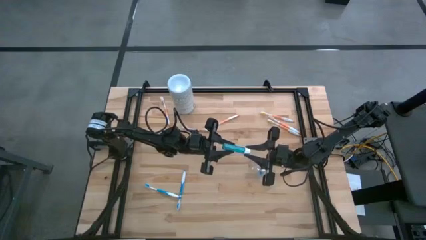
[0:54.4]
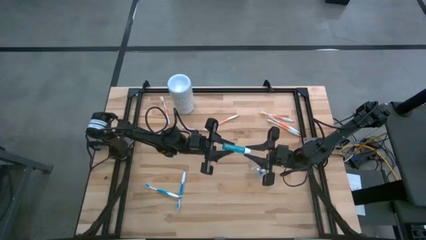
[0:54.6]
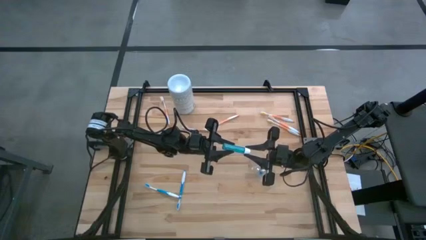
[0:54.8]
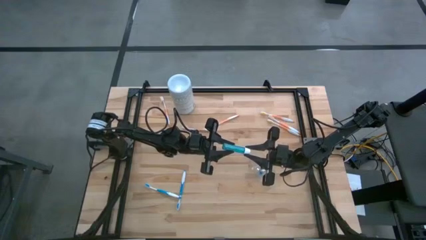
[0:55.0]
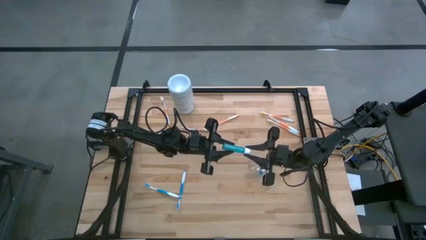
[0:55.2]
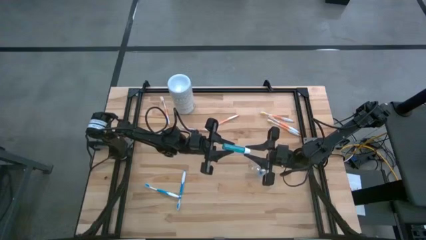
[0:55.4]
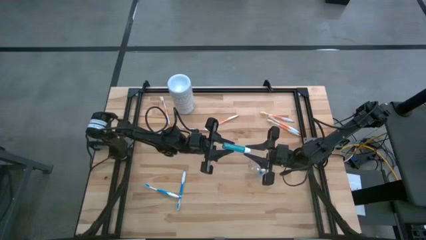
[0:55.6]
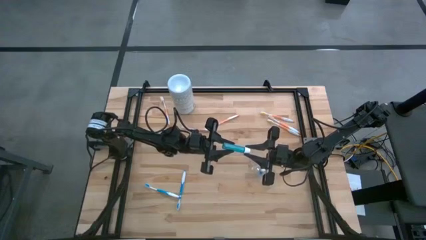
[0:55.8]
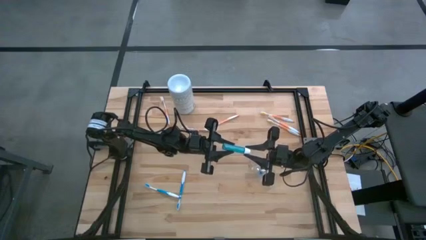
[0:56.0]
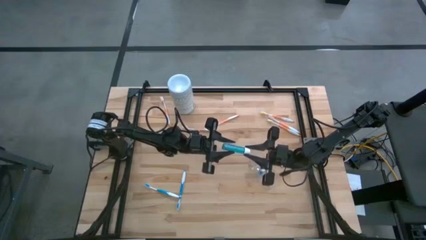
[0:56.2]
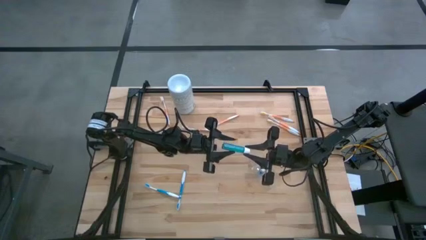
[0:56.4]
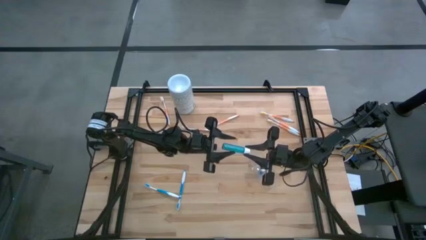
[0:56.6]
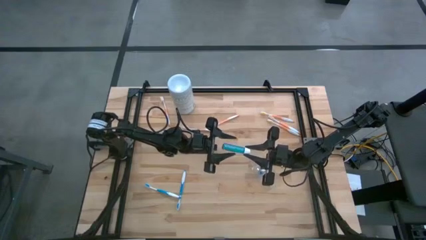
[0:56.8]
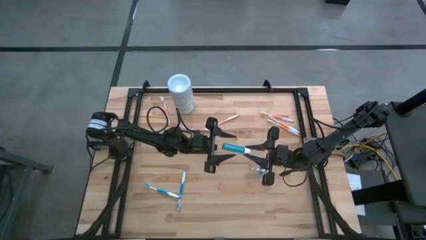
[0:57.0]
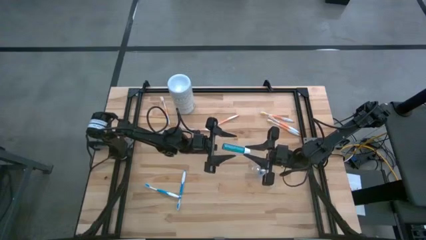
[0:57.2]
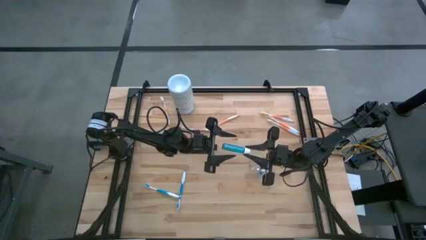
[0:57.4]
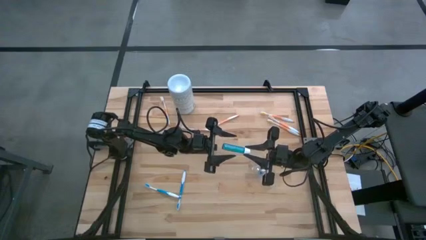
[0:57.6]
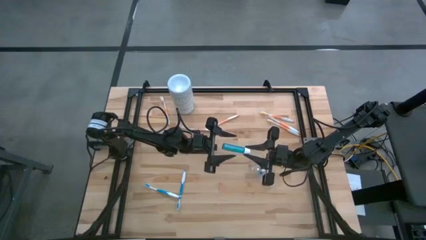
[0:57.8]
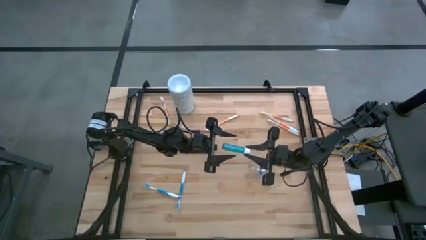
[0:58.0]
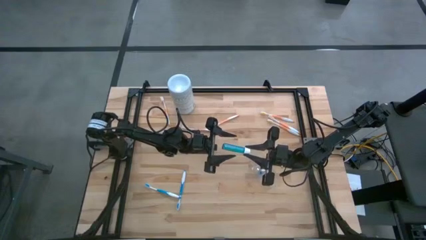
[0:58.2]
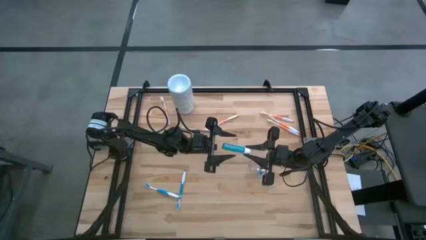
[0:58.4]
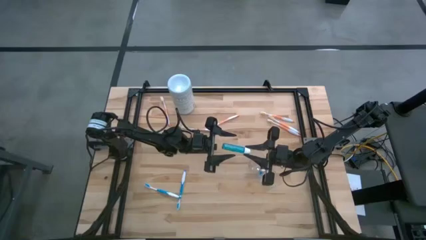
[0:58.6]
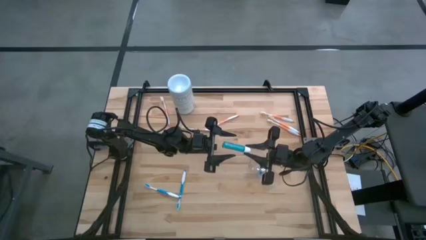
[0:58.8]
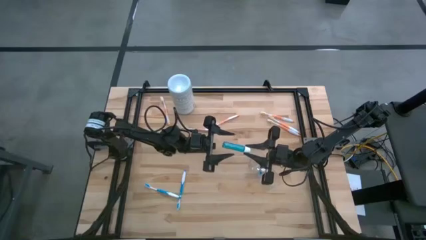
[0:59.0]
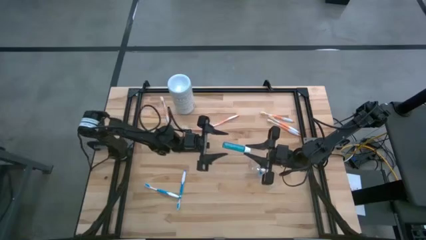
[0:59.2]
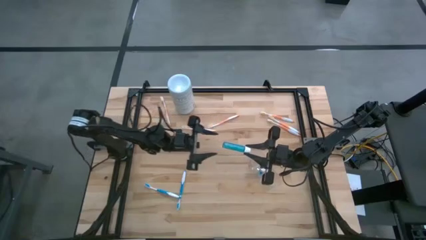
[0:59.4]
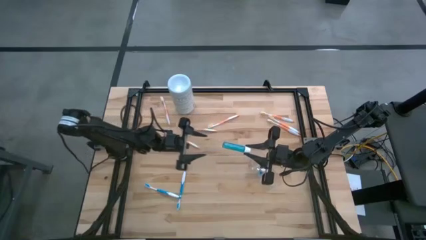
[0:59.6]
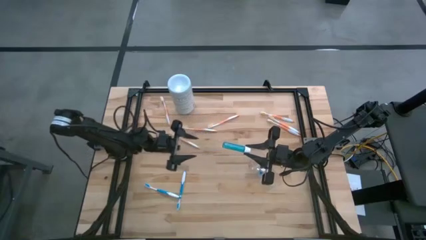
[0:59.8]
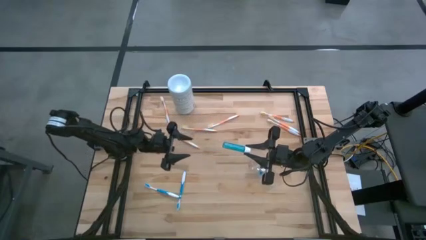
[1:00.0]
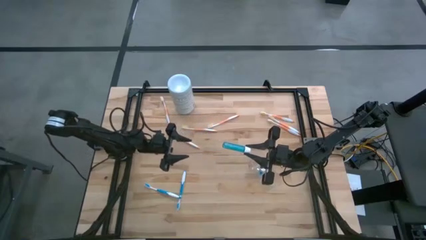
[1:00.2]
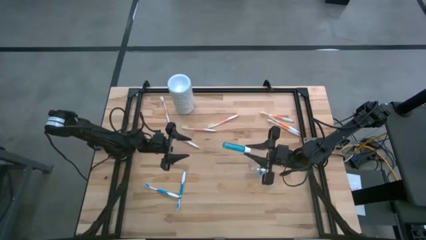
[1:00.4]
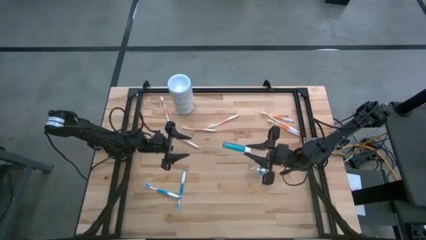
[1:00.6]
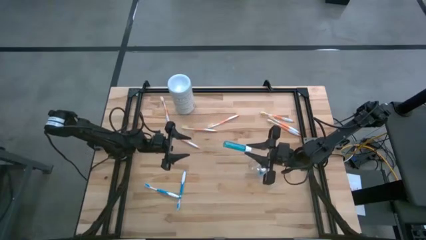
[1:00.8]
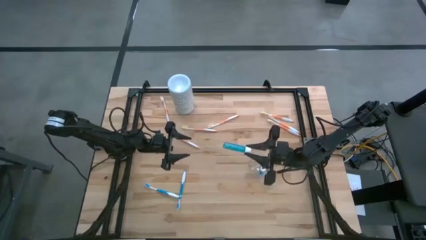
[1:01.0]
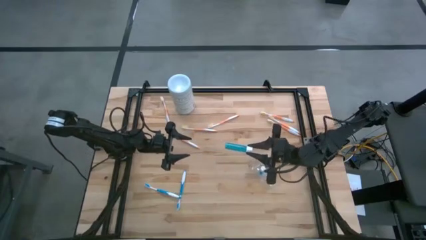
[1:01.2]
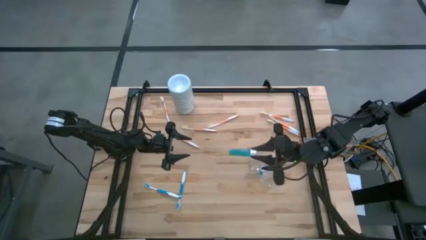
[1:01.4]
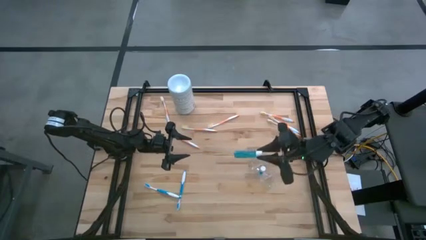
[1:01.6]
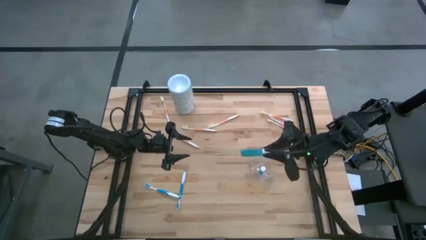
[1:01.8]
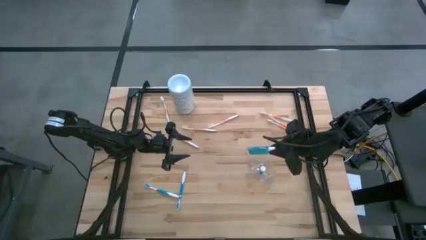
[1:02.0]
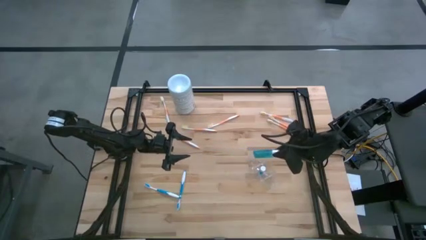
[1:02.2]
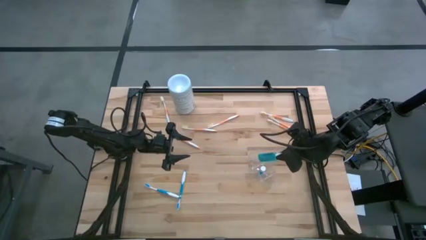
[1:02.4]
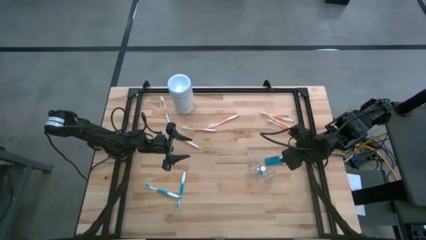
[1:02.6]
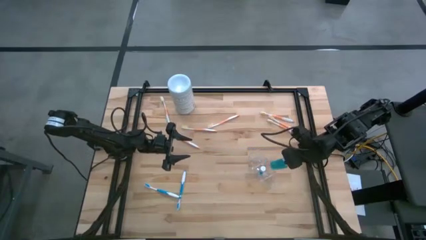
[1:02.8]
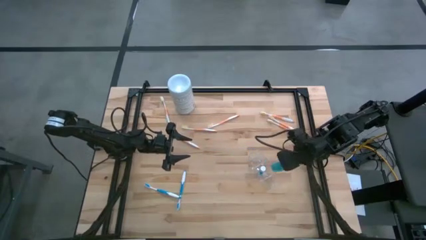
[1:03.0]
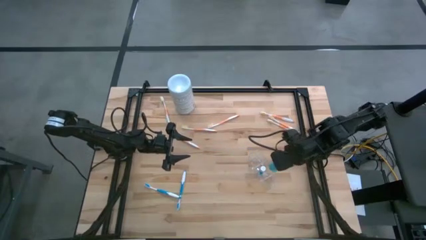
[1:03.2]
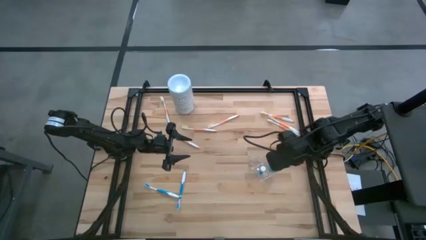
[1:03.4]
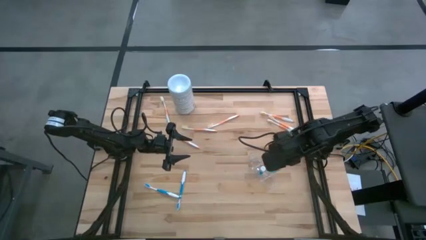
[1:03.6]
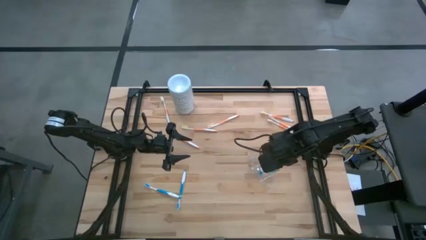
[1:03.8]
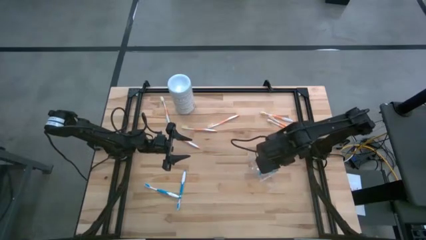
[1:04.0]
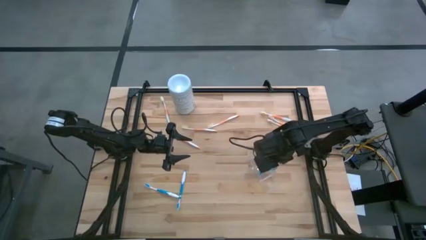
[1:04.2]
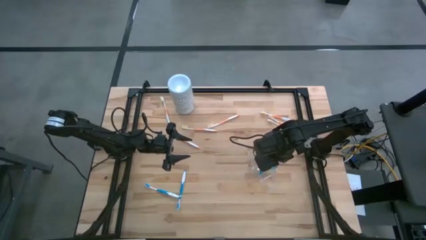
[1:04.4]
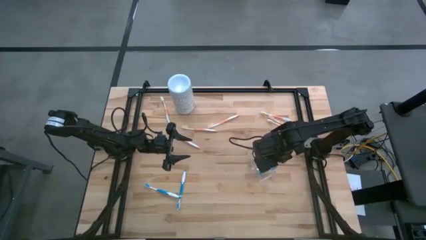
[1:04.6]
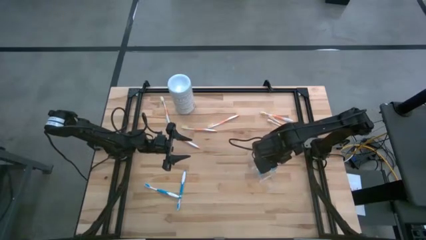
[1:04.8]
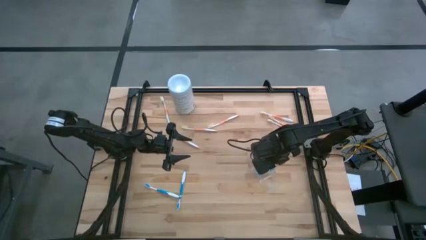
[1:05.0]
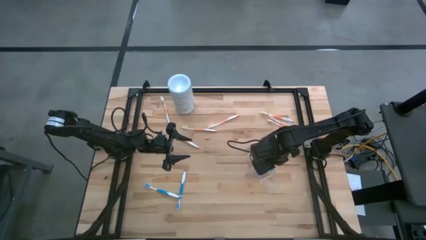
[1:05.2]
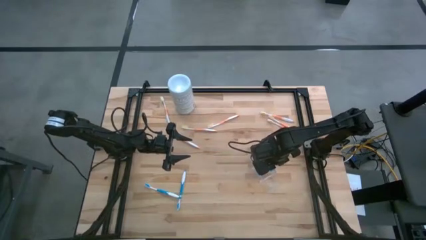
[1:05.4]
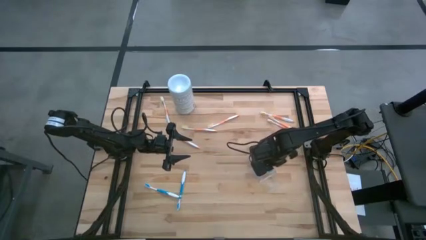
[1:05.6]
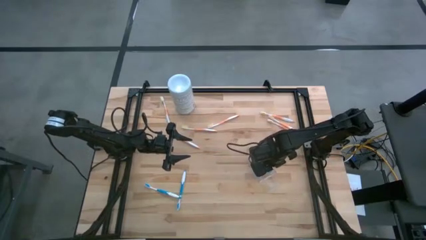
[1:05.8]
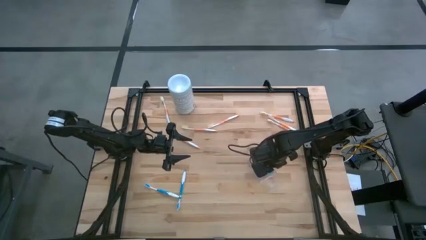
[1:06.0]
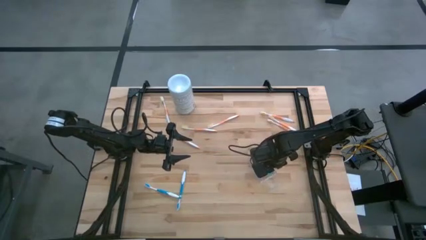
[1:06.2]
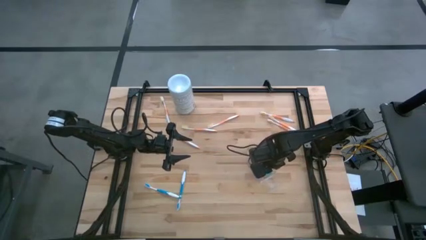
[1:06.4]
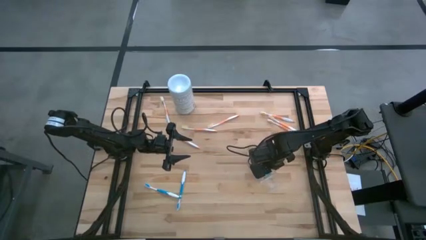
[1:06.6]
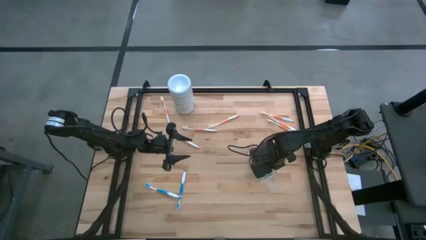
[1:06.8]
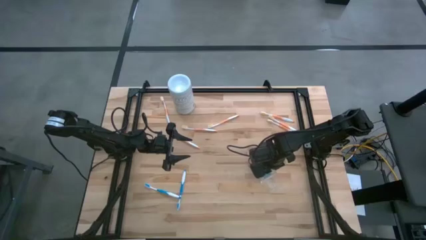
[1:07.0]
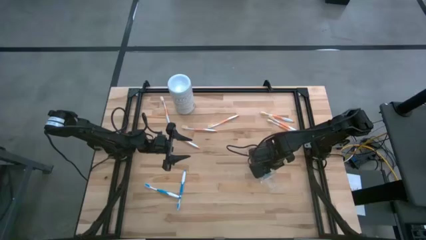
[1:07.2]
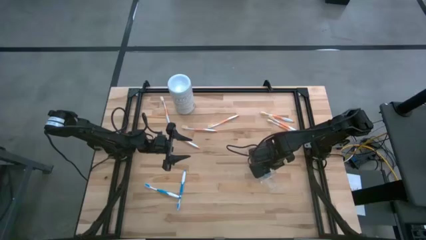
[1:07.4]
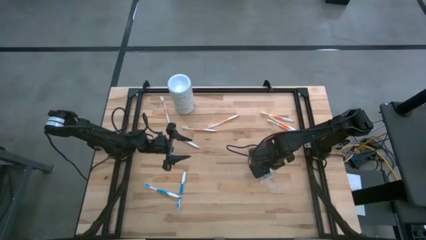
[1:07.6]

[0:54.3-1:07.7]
Task: Pick & Place toothbrushing station
Put the mouthwash into the middle section of the transparent organizer

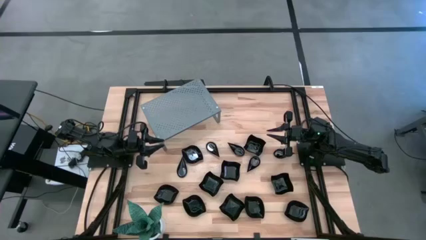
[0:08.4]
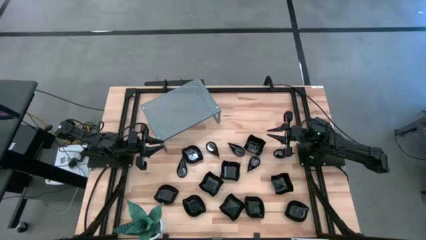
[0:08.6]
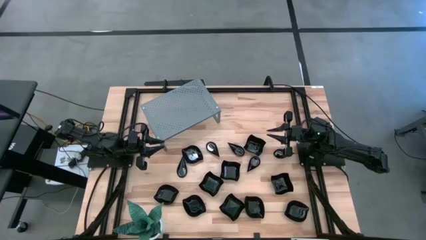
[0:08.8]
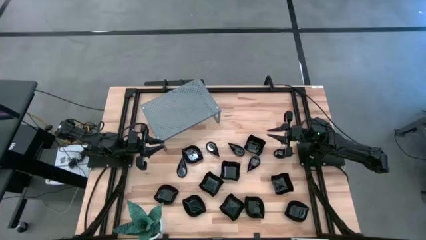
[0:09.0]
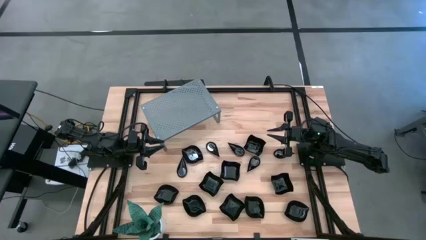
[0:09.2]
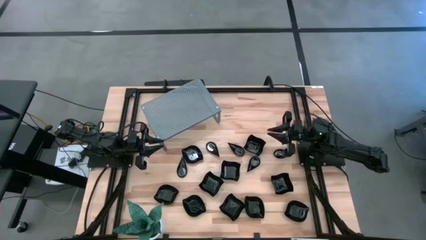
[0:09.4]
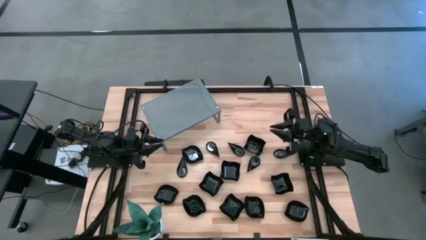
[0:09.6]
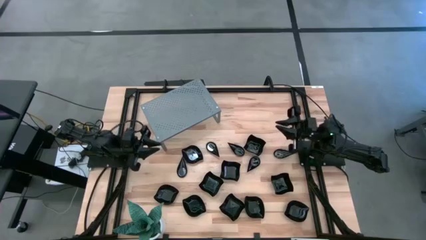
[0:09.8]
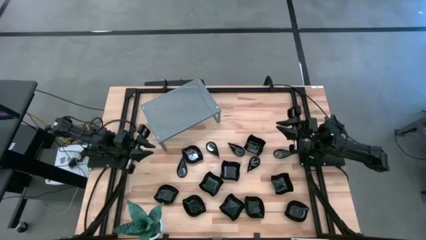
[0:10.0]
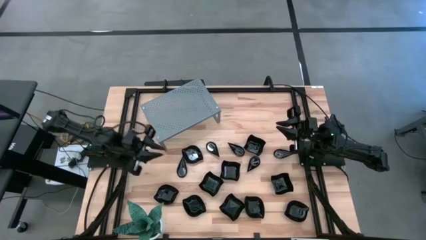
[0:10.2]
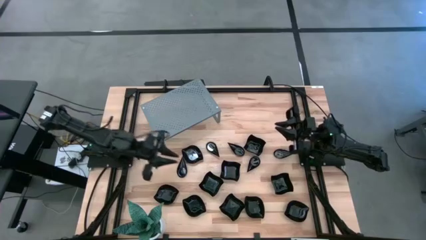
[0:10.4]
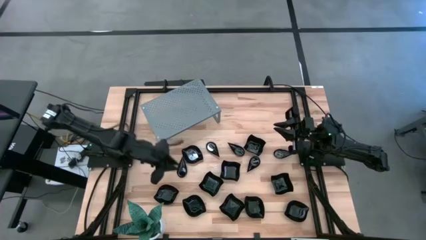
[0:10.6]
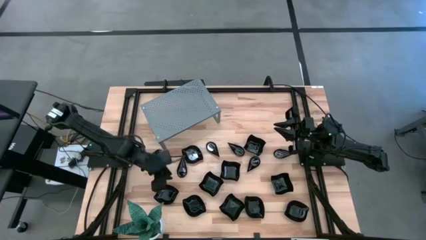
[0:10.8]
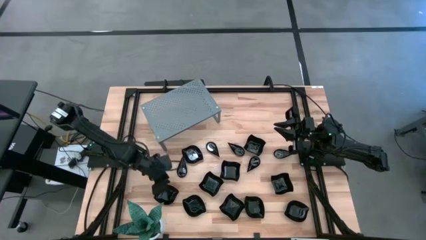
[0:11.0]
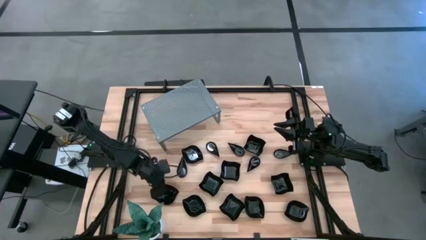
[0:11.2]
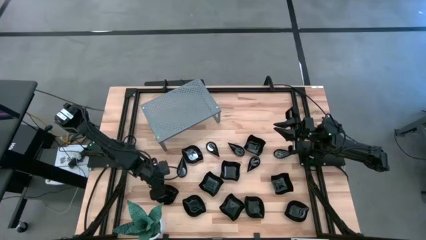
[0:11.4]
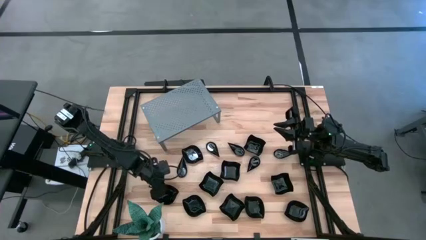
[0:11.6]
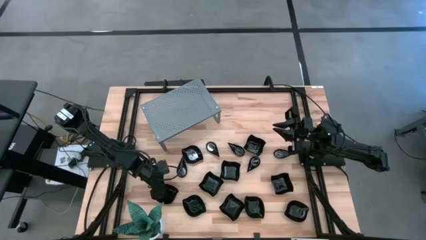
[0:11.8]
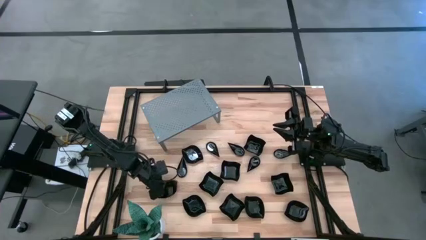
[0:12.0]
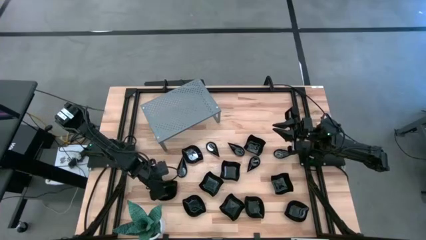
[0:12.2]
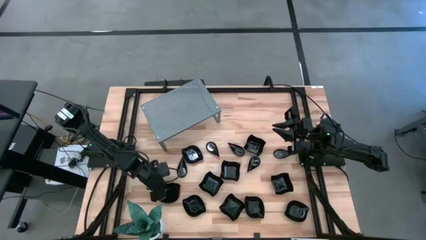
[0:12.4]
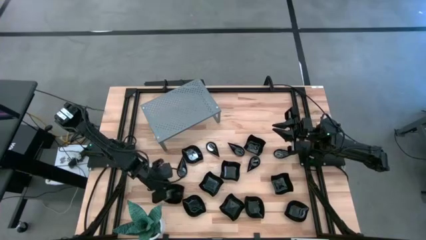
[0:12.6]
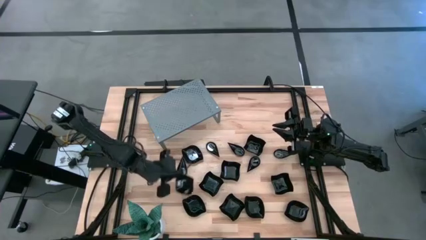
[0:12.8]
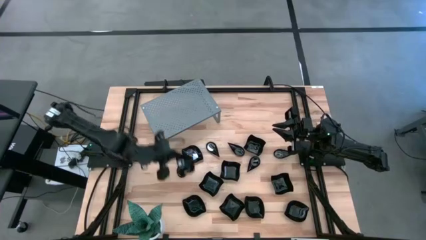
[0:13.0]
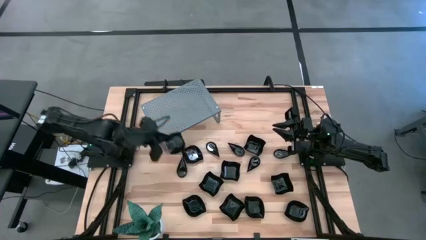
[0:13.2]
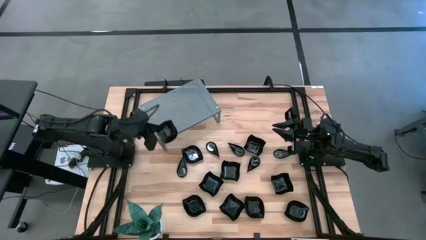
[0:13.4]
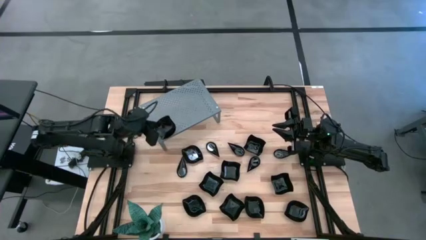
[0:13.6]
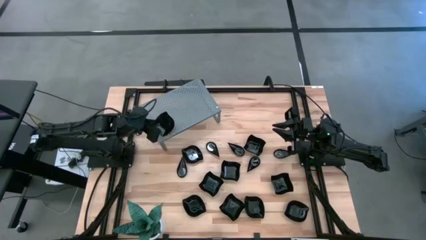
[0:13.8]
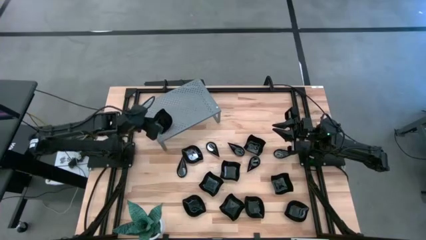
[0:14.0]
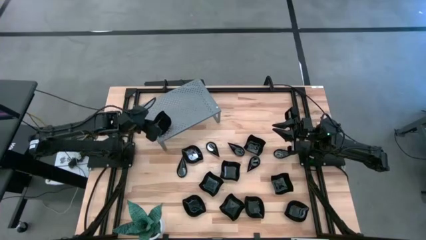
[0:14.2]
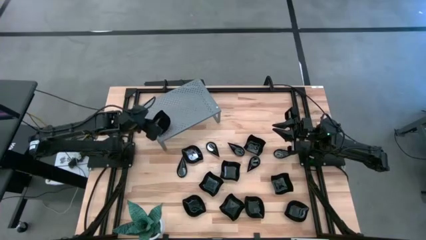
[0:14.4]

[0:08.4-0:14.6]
Task: Pick & Place Mini shaped plates
Put the black leaf-shaped plate on the shelf
